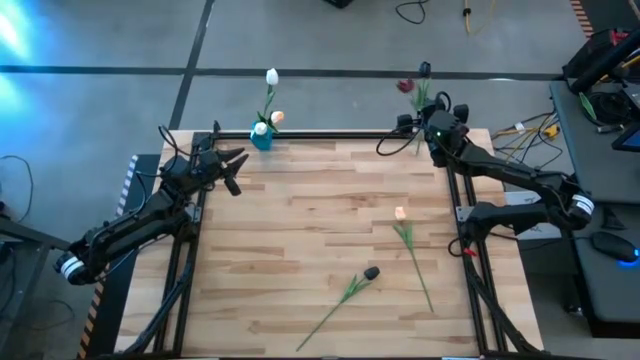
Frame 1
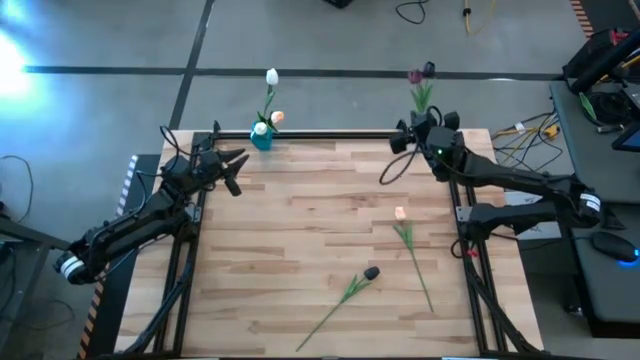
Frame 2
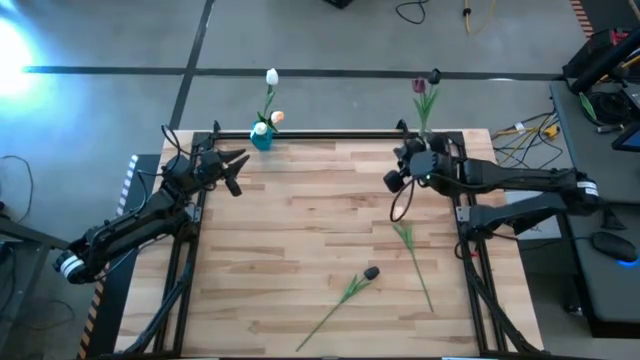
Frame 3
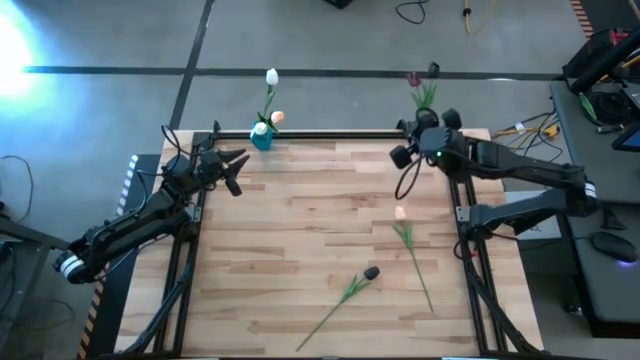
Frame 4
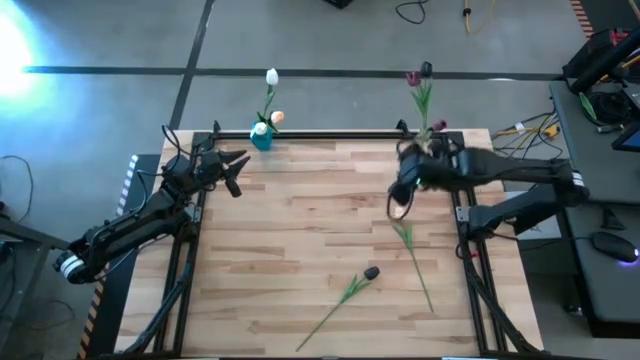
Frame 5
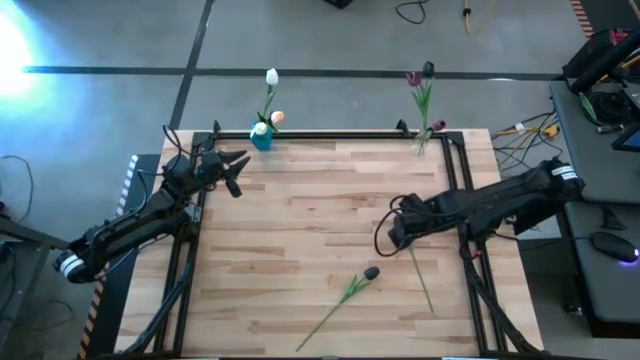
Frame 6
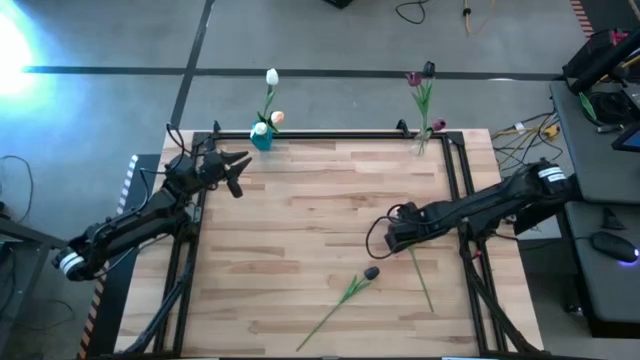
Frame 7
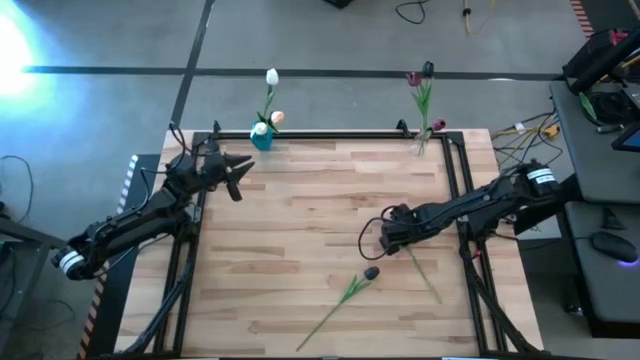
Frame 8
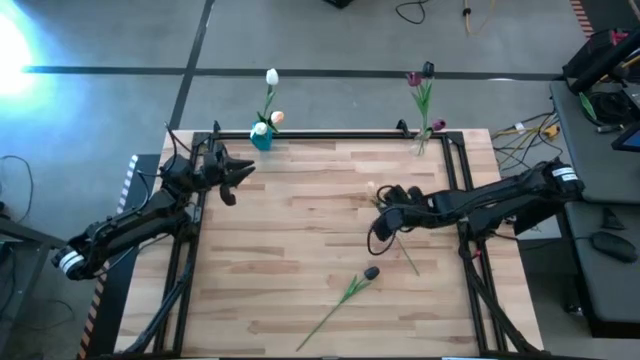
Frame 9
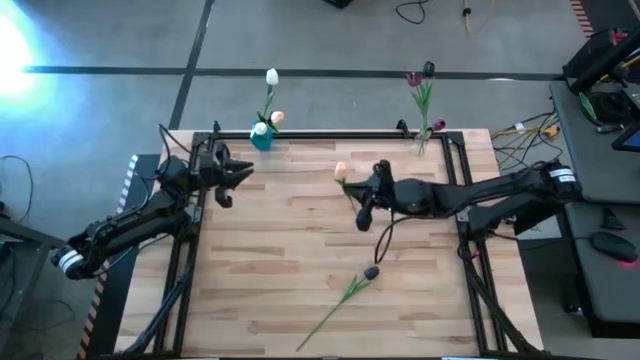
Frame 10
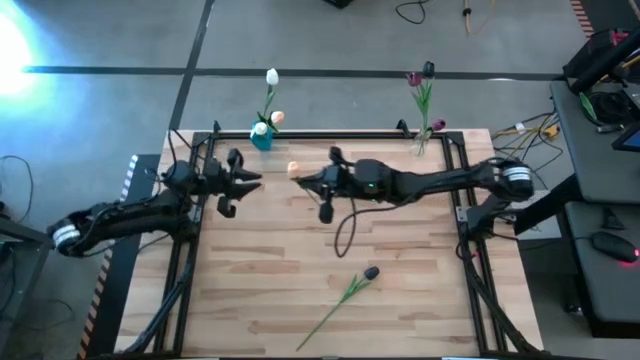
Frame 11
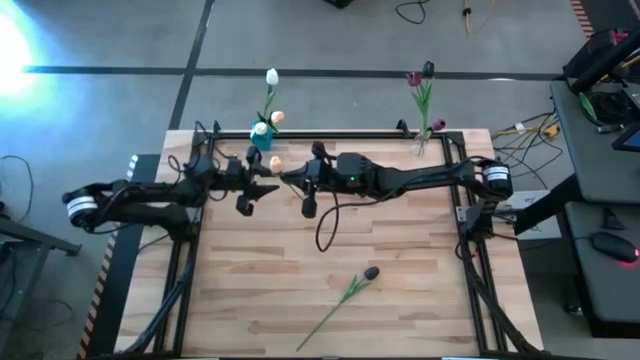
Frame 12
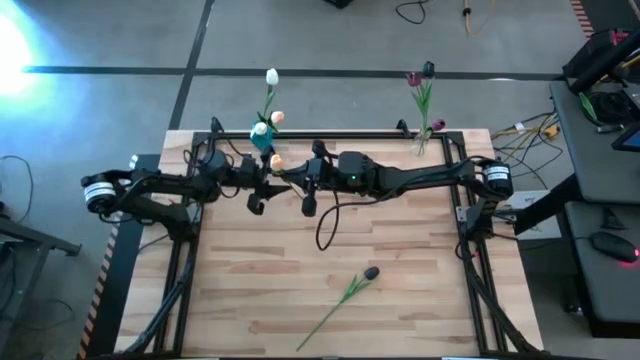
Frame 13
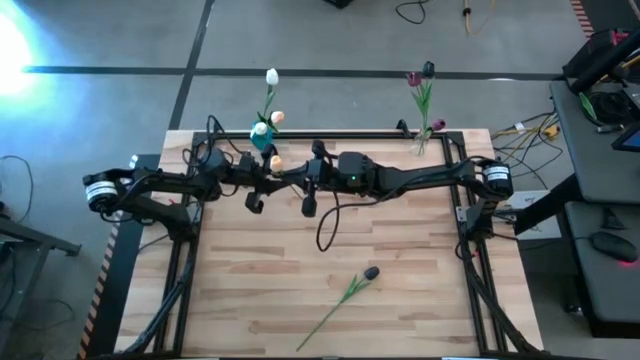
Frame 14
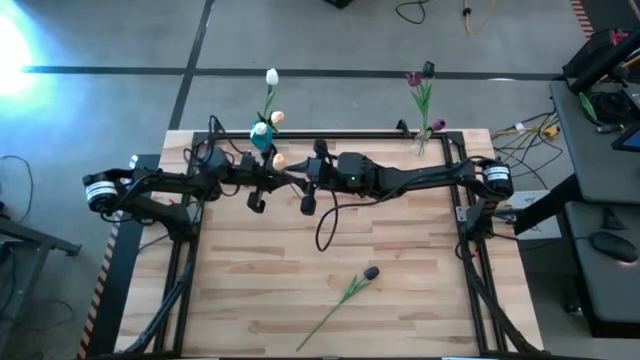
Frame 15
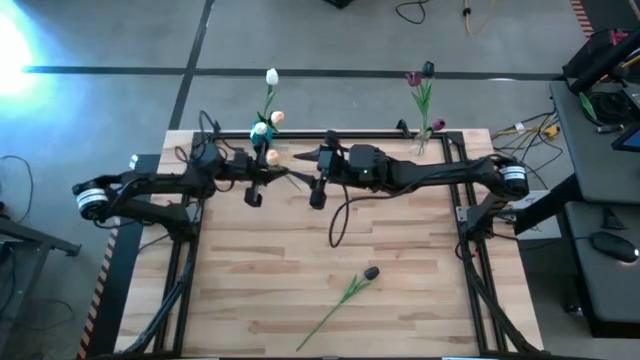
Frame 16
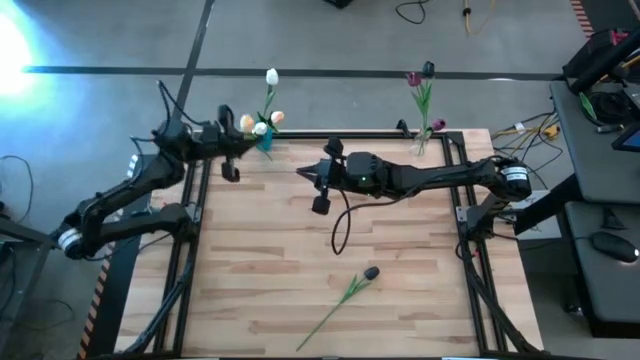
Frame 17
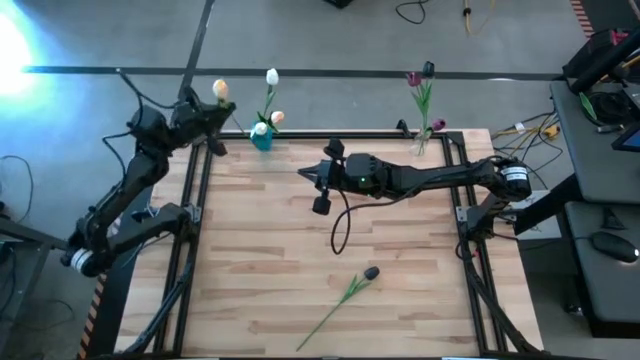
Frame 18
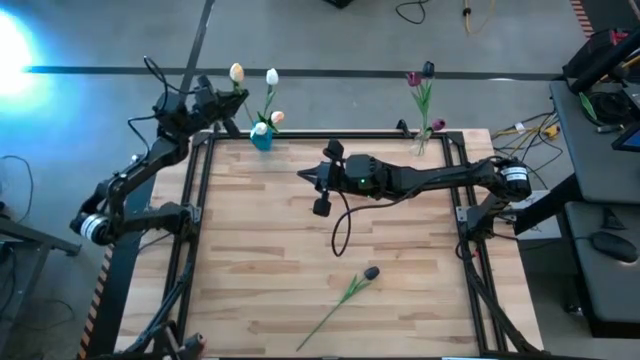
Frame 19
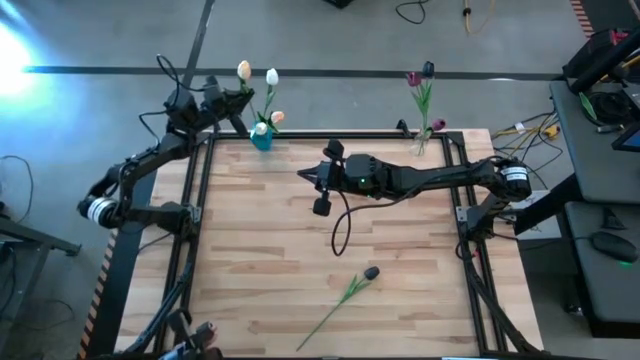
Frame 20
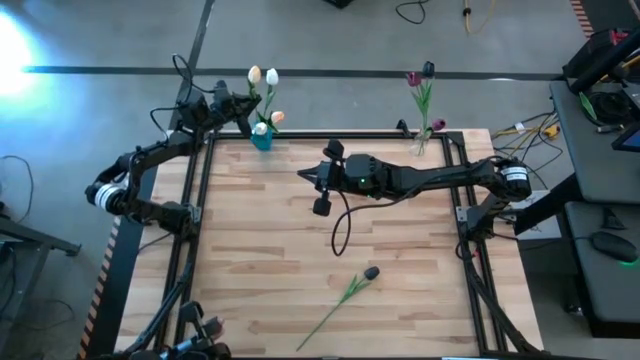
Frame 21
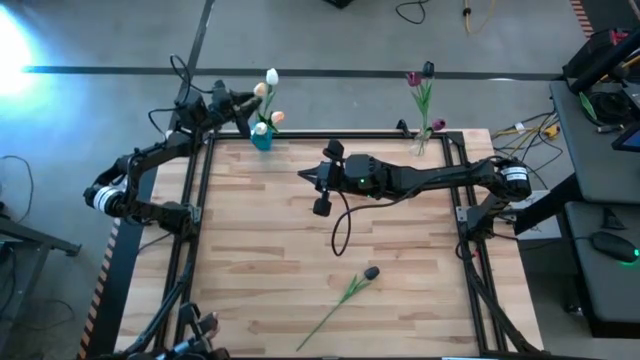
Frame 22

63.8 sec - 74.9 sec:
Task: Sort flowers into vase by color
Put the orange flower into the blue vase

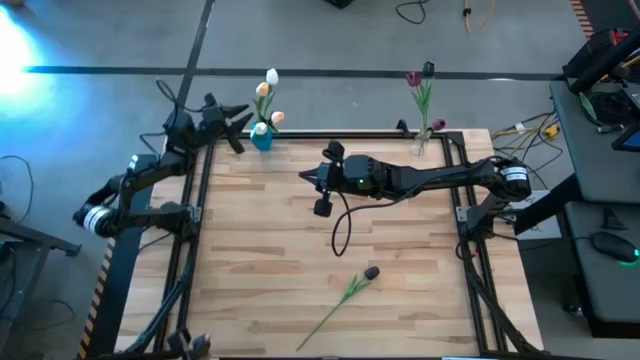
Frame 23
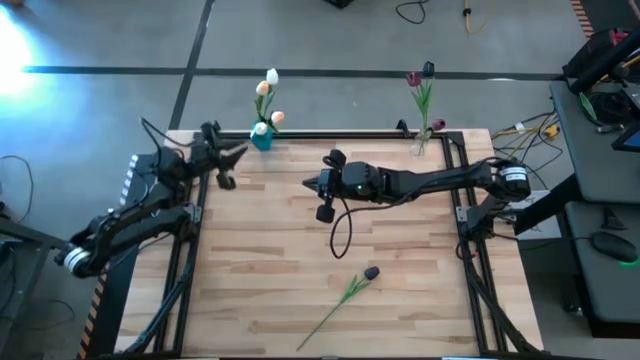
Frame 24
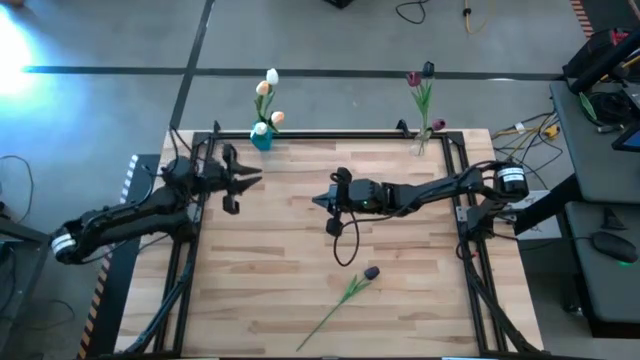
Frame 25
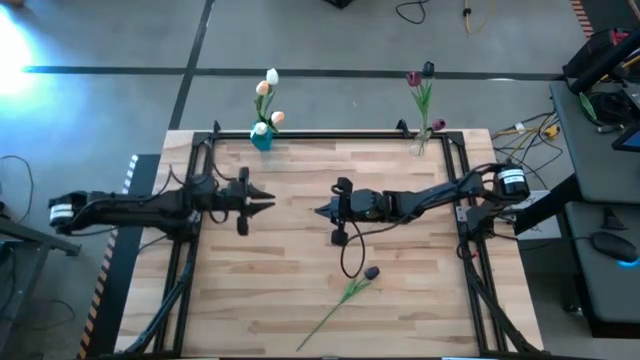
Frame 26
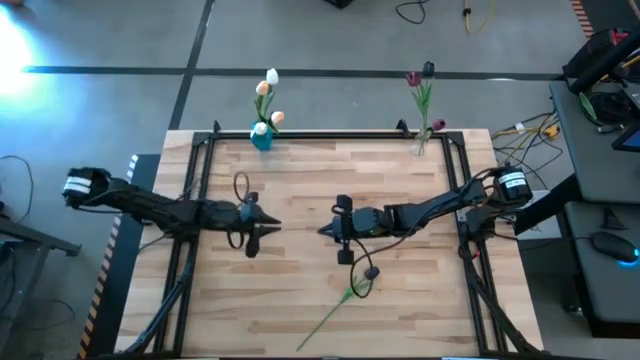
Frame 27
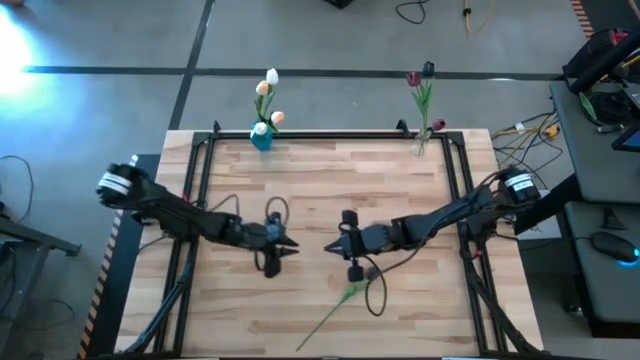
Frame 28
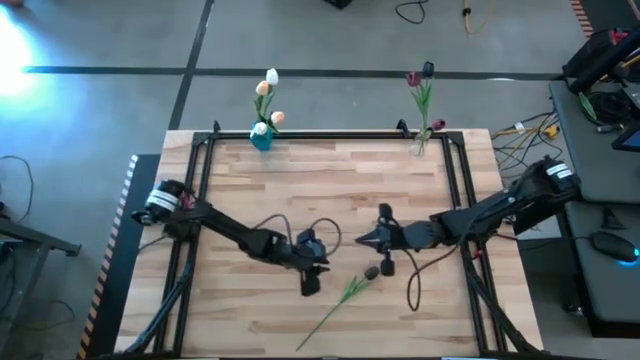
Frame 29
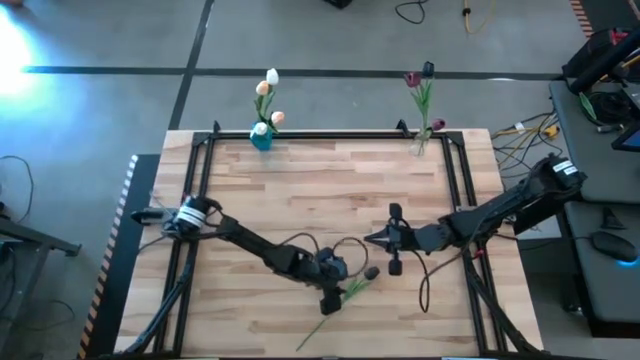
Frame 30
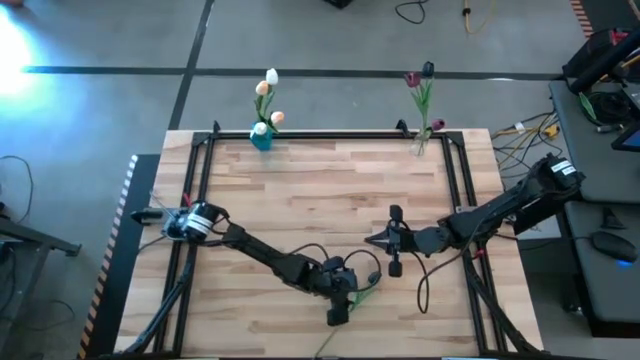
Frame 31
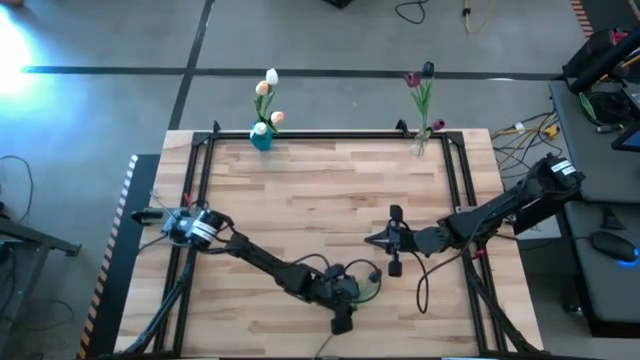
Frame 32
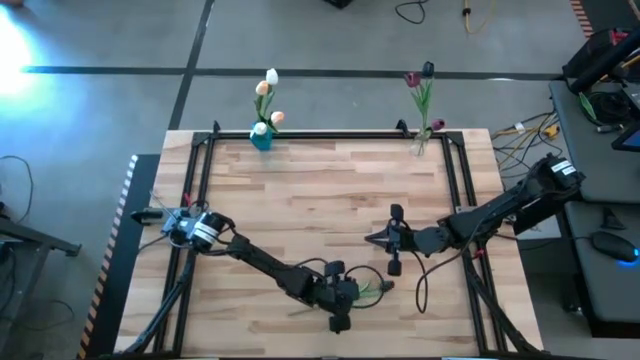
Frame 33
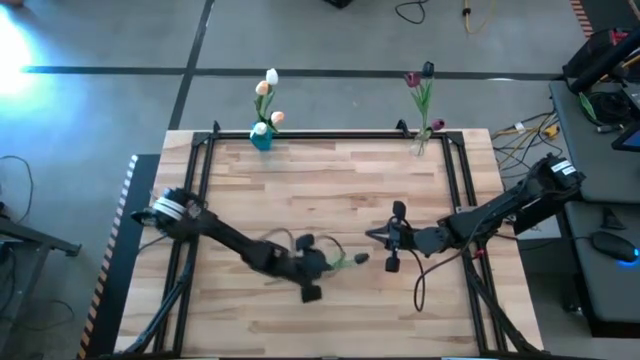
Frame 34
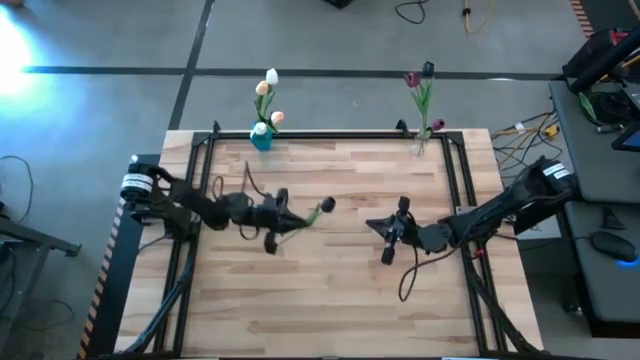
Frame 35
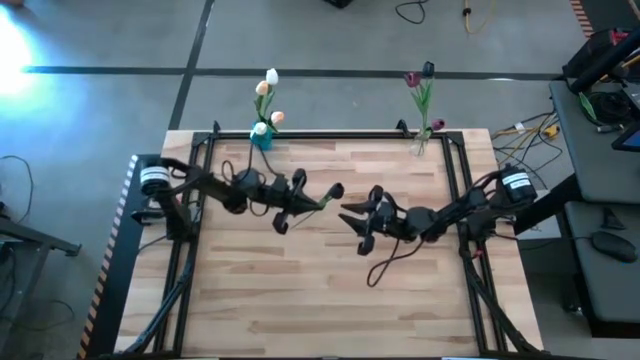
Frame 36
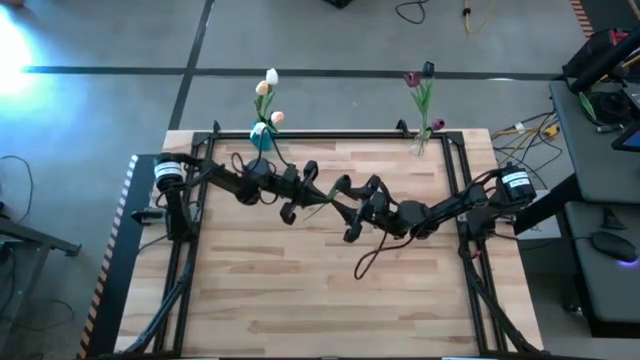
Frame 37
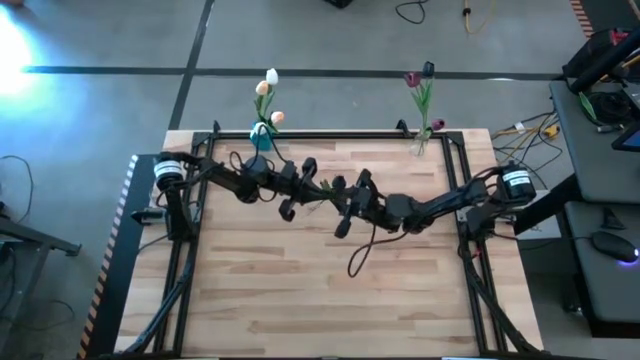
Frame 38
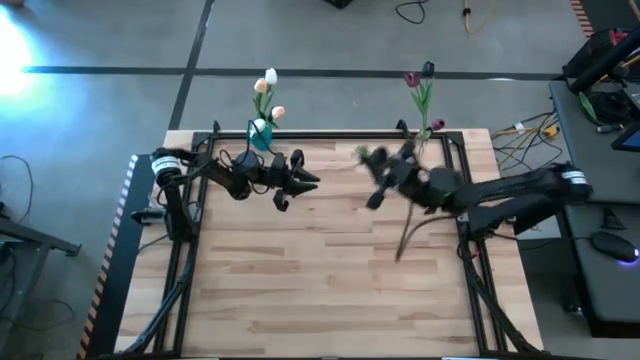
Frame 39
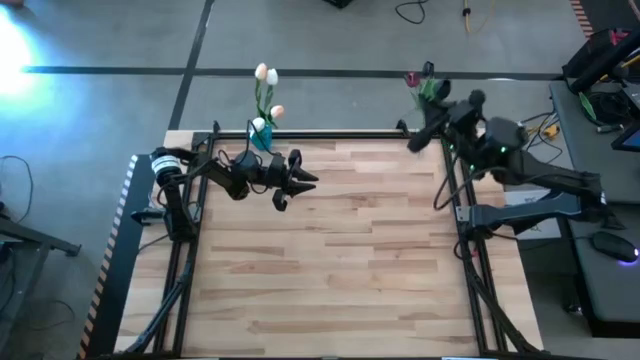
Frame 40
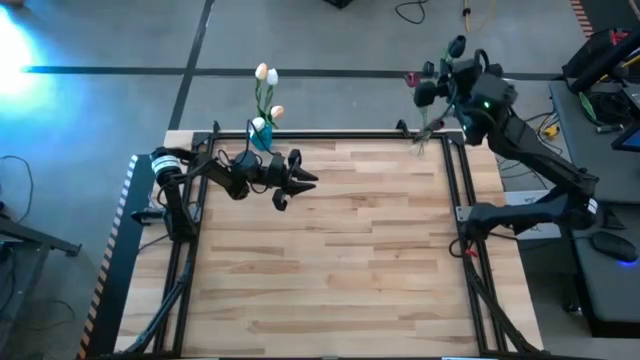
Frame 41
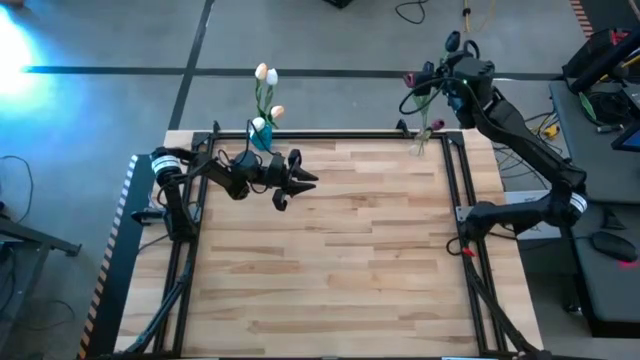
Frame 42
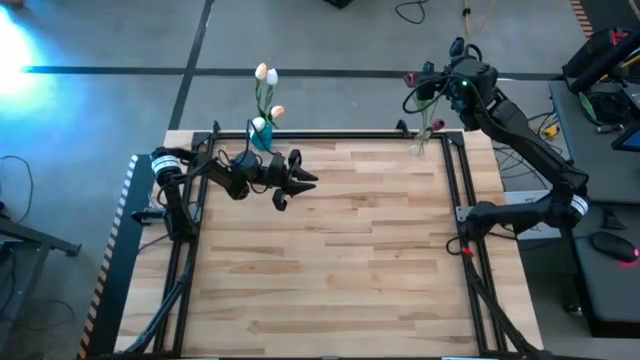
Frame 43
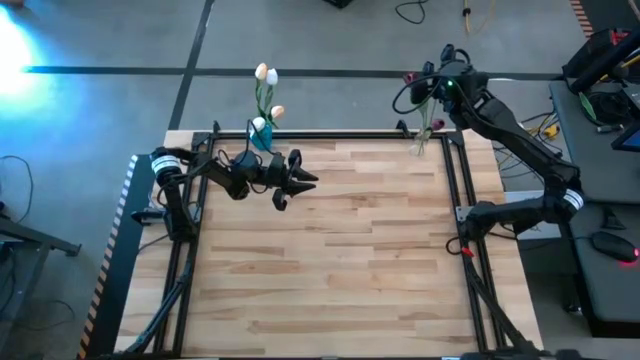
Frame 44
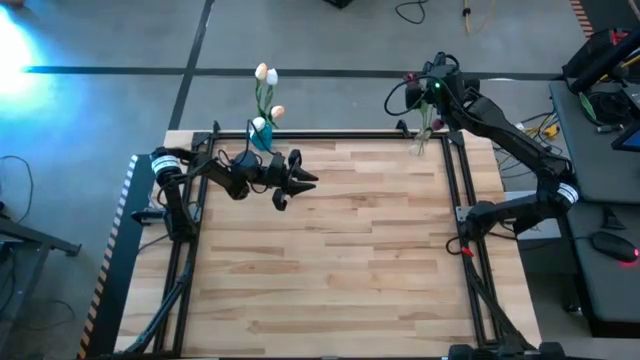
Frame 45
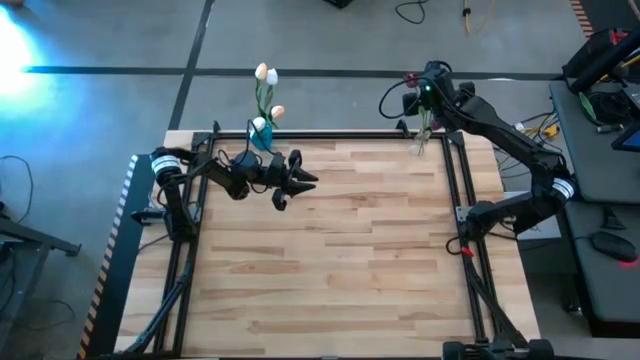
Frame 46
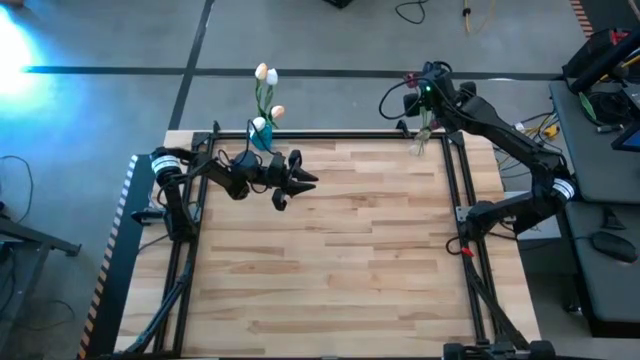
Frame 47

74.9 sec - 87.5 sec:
Put the black flower into the transparent vase
